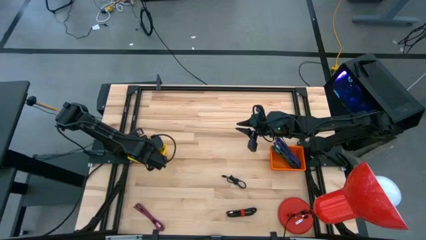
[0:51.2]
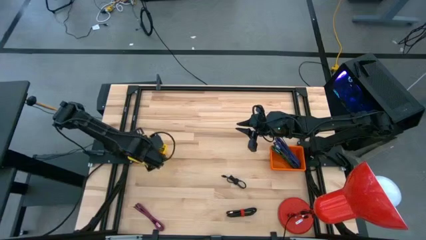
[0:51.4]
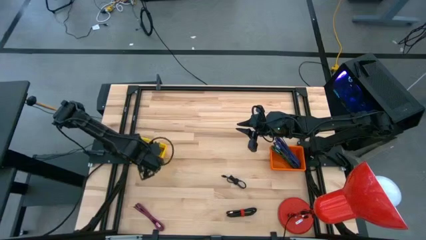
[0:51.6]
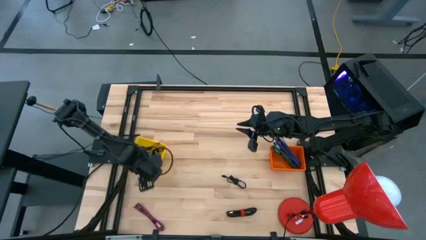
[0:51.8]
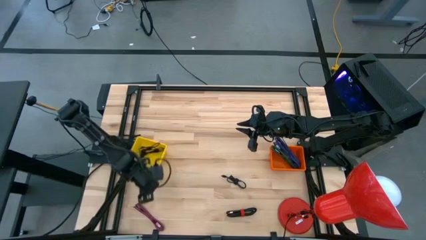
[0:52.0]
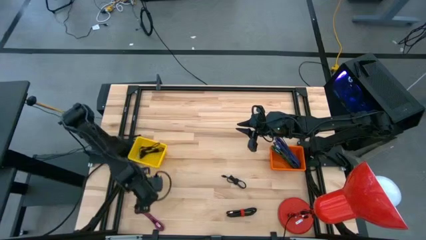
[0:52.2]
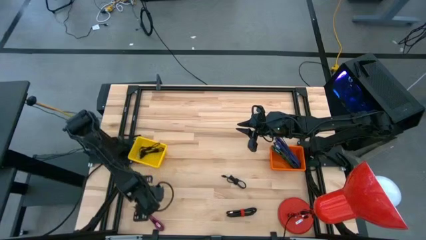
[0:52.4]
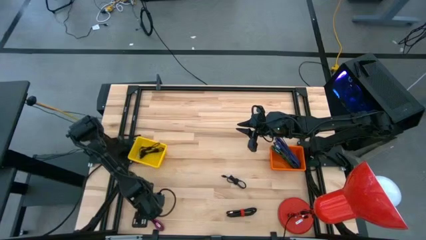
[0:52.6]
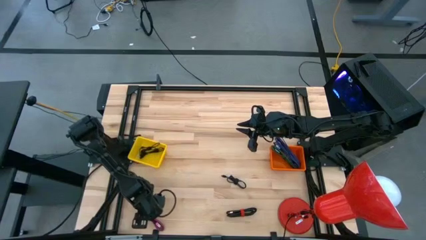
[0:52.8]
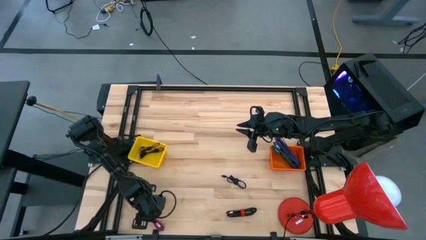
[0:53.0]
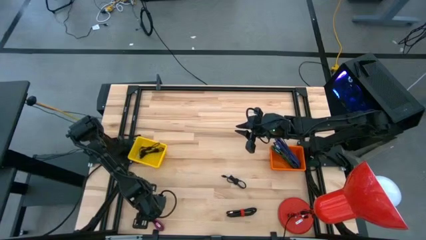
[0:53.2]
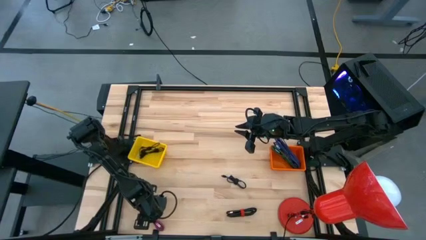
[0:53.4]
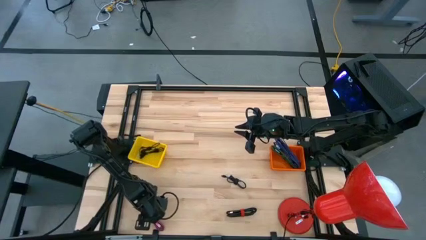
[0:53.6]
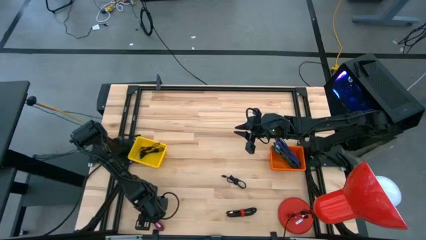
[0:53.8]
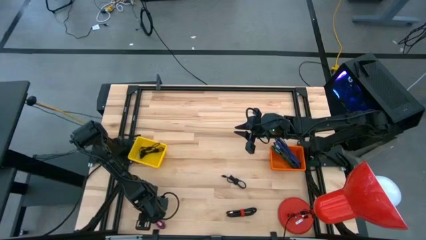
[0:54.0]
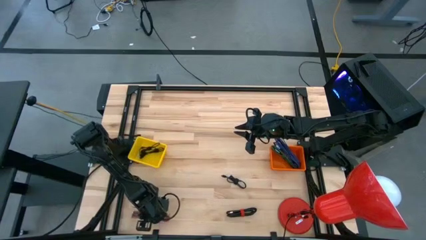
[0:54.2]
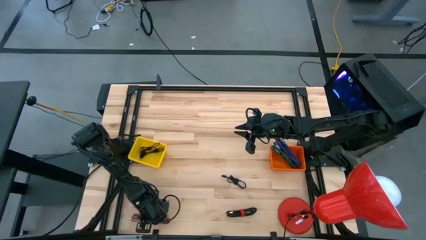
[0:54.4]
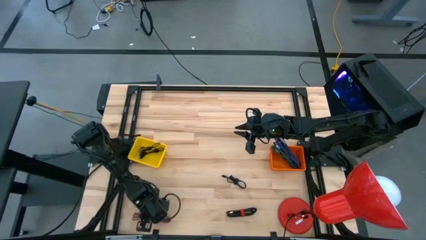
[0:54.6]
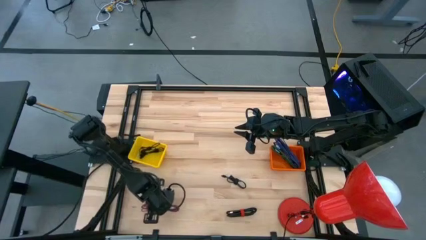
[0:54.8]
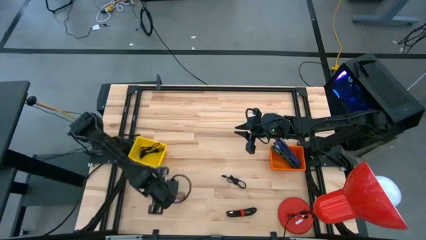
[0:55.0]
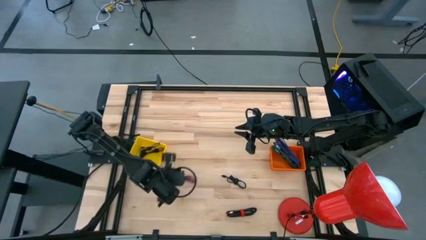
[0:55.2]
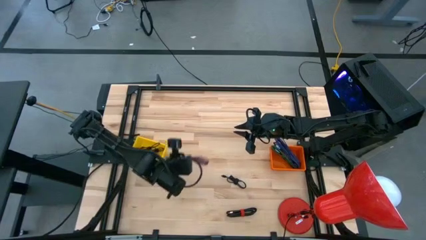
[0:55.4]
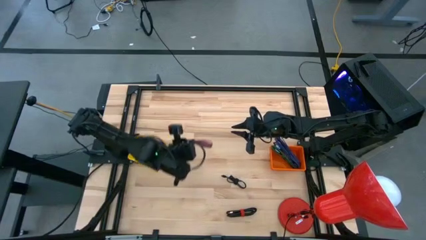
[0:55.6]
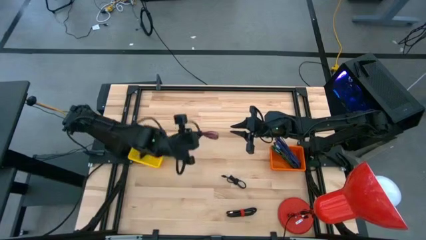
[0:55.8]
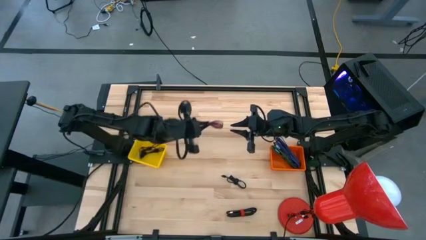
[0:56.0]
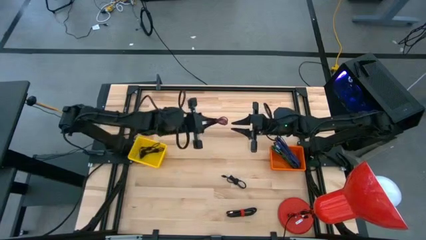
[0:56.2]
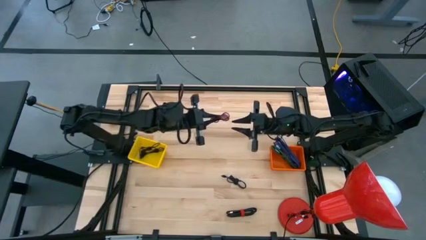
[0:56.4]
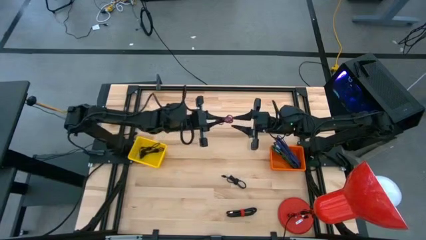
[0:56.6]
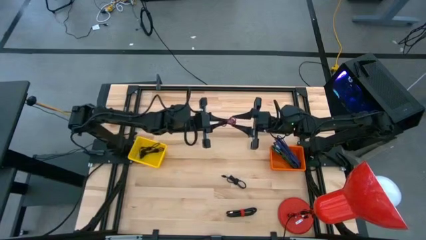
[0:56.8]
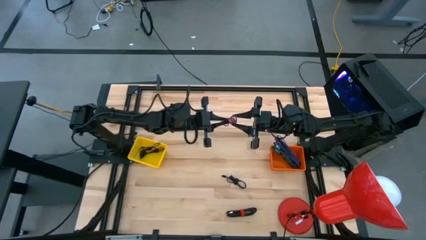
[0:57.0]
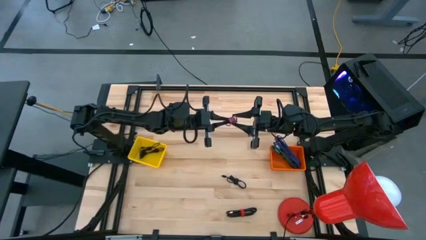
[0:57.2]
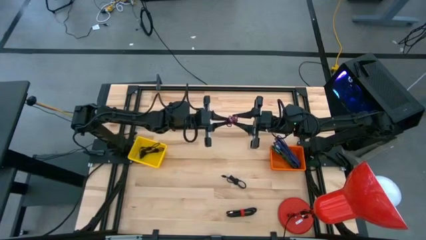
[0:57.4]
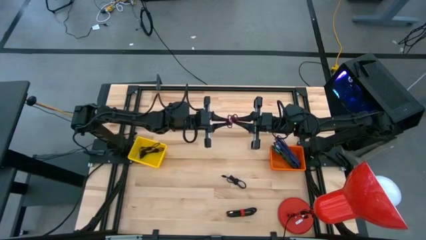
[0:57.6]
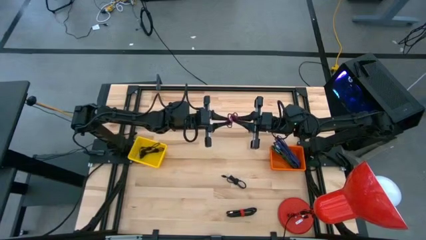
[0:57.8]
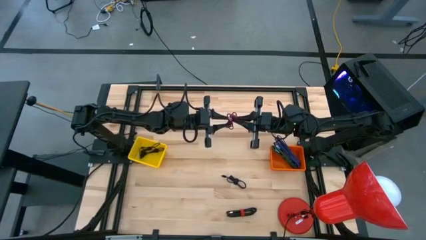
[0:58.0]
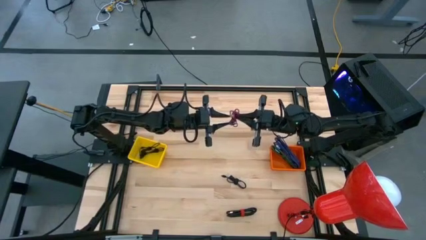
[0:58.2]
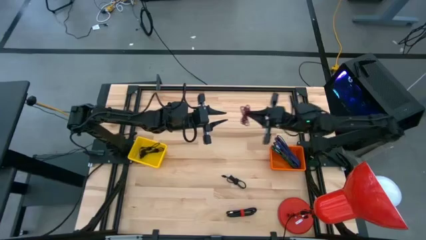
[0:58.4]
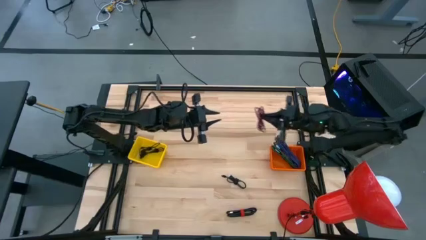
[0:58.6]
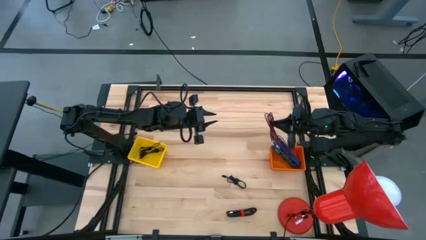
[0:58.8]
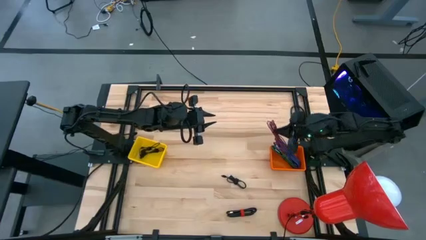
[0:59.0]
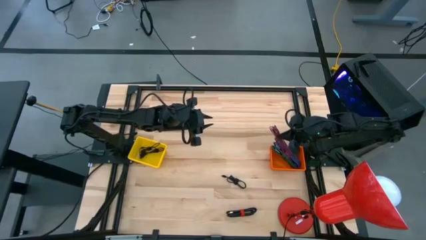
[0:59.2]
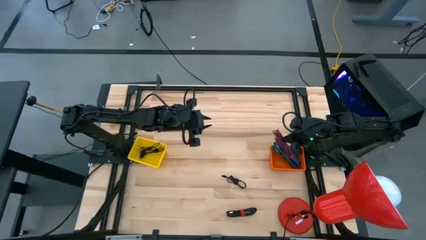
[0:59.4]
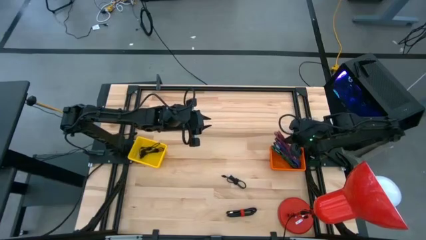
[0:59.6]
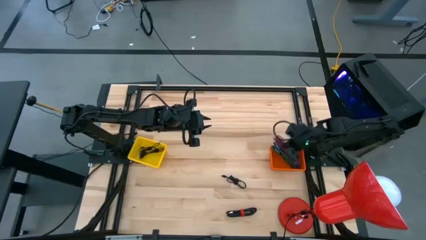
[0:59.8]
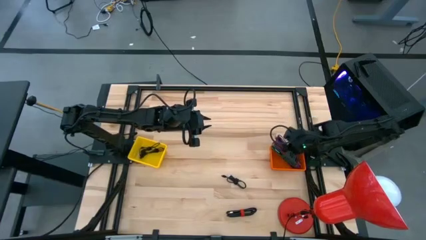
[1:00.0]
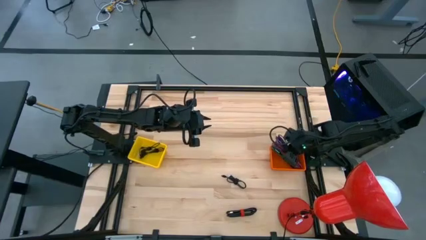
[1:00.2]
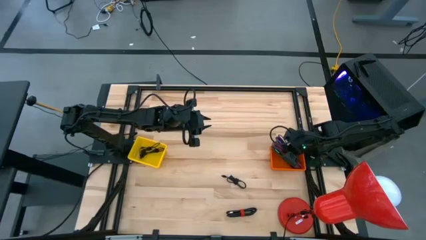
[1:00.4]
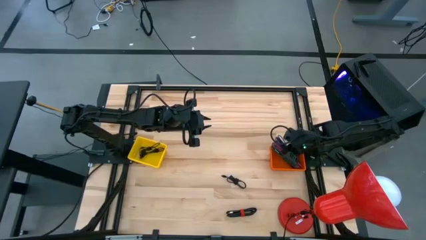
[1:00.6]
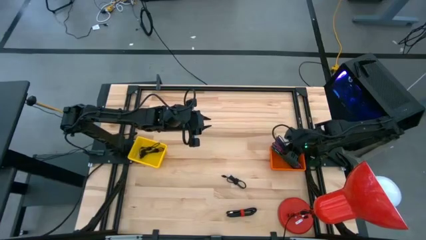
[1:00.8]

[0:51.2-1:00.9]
Task: Pick & Place USB Port
Put the black charger cable into the orange basket

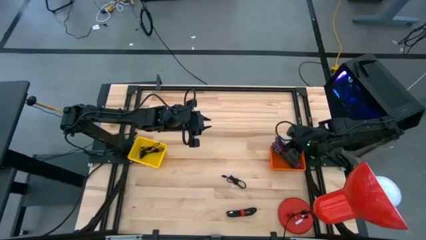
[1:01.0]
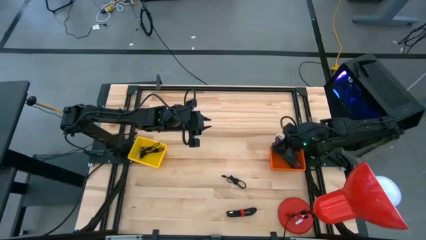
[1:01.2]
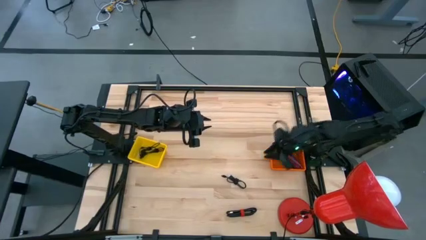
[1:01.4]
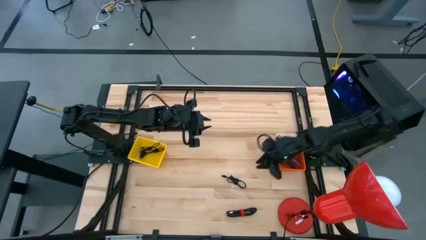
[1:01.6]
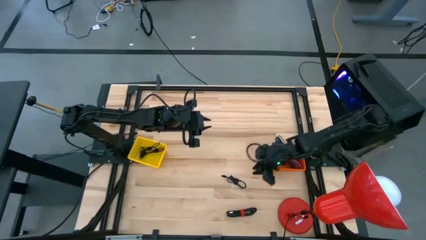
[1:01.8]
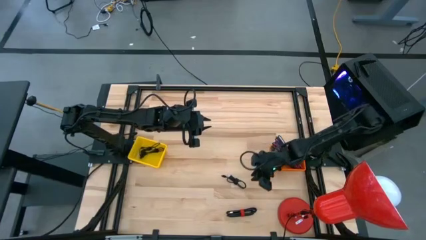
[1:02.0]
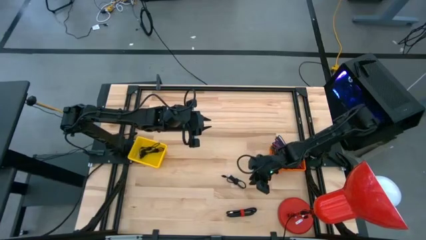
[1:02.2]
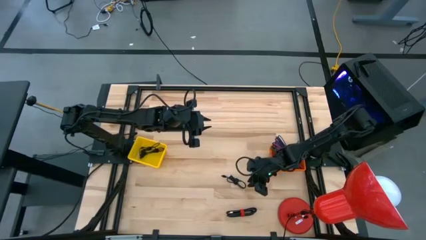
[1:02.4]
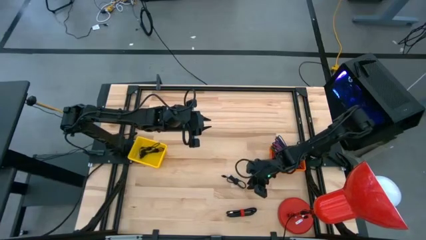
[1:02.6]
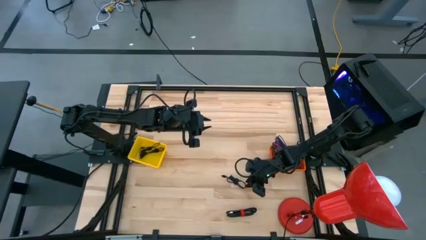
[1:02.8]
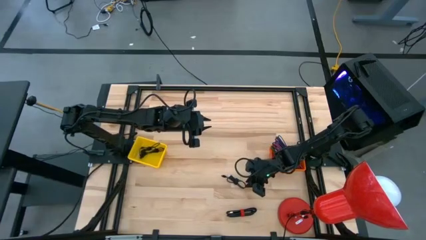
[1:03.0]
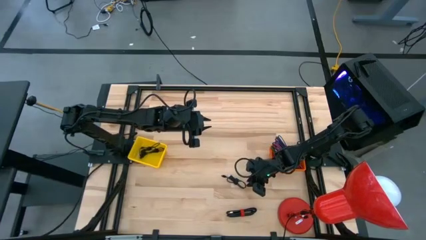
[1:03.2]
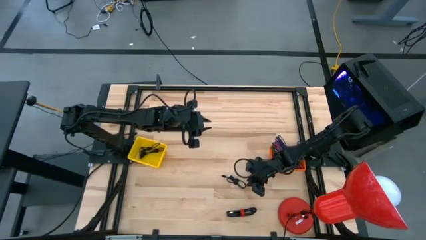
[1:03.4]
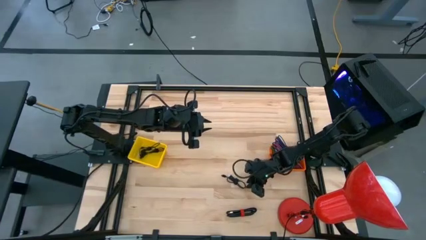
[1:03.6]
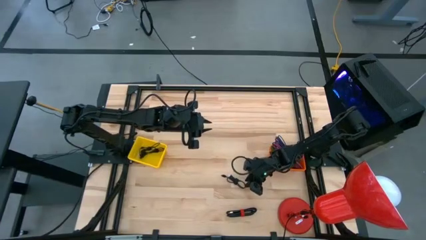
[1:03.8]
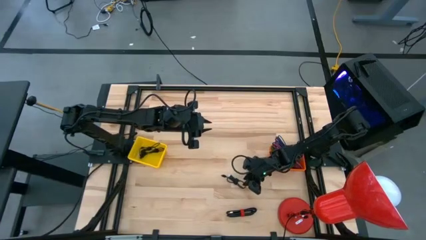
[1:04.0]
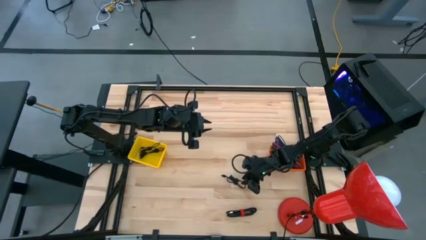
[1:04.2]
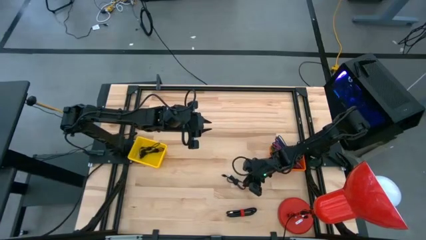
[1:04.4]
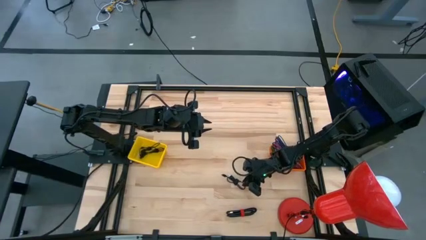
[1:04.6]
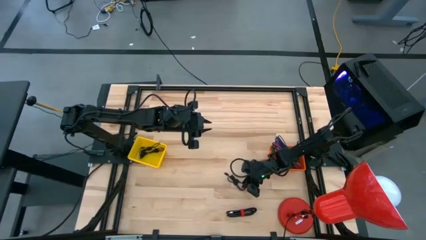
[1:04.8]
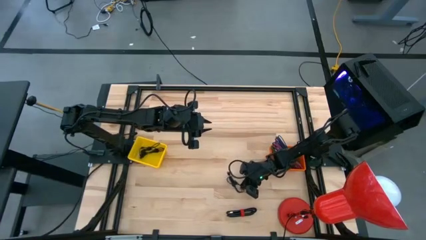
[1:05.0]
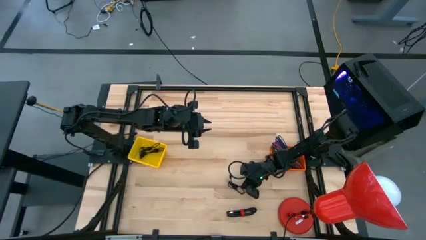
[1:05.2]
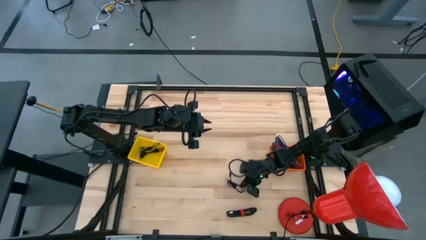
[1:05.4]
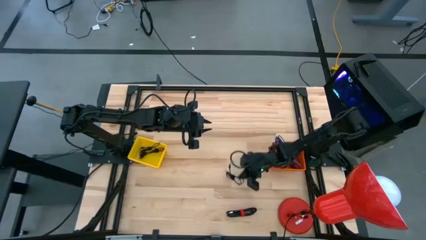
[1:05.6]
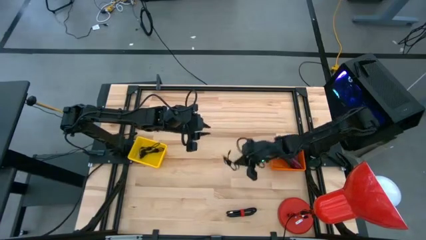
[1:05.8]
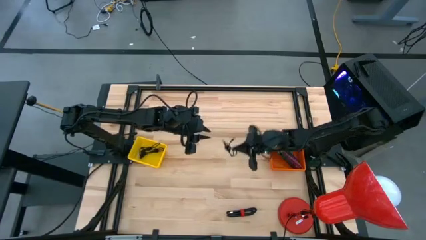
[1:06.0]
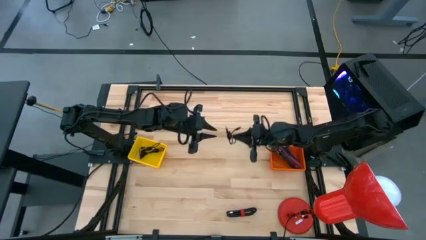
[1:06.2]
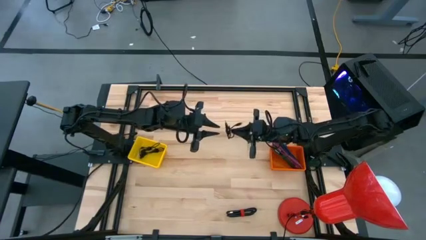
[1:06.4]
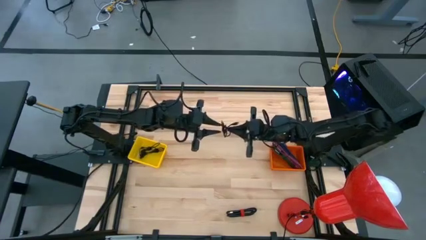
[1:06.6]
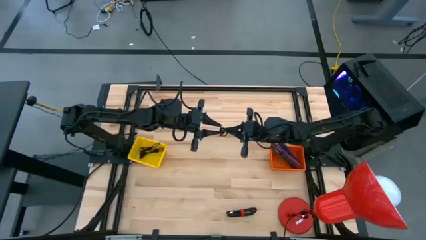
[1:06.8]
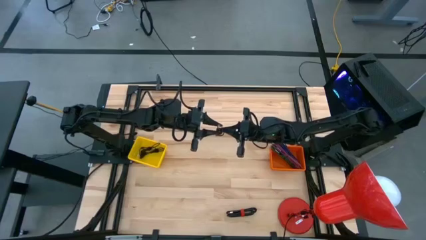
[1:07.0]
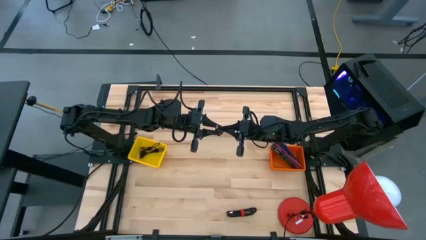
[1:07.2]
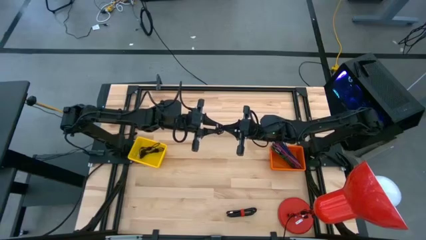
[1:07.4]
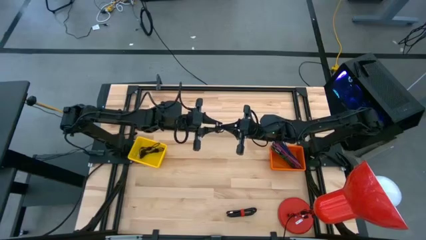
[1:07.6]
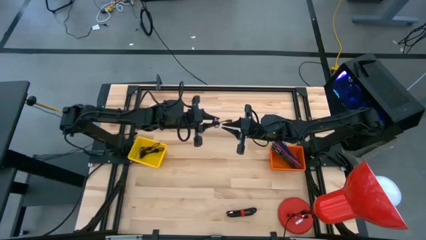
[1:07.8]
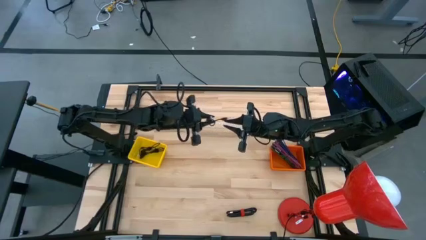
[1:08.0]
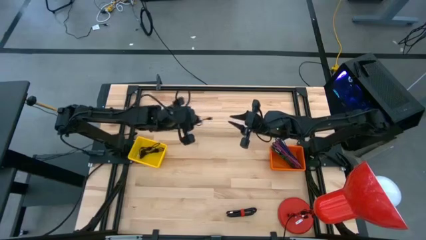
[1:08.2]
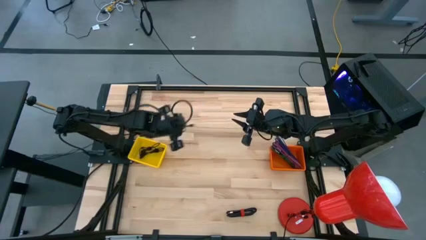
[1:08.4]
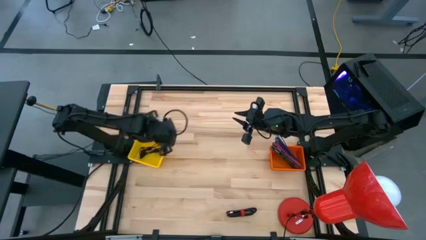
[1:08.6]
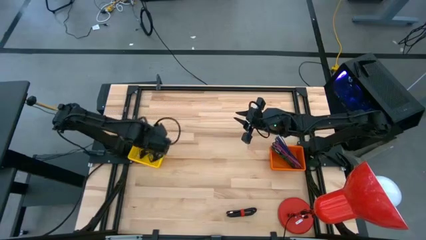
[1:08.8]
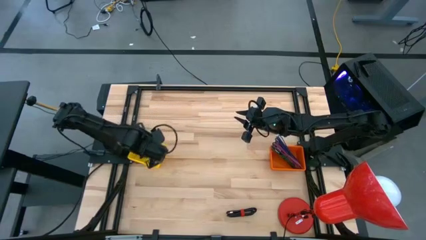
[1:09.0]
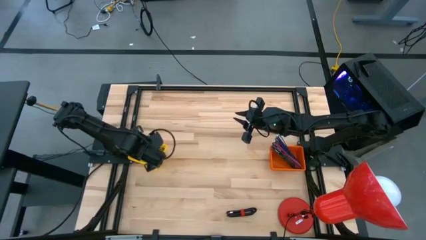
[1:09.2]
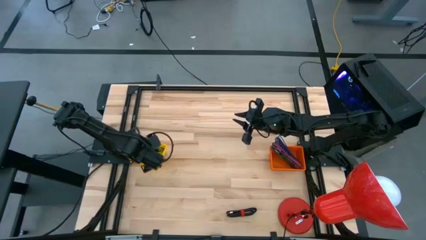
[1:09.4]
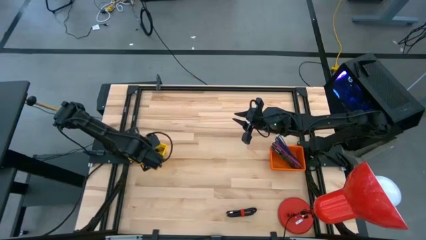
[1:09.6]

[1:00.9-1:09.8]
Put the black charger cable into the yellow basket
